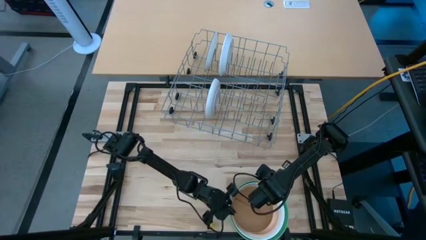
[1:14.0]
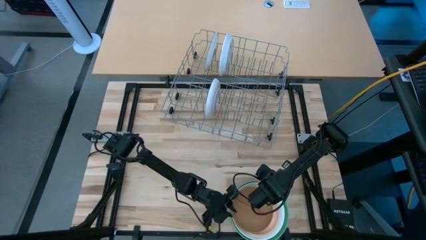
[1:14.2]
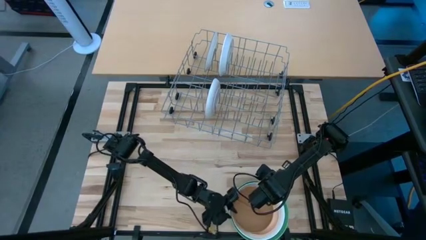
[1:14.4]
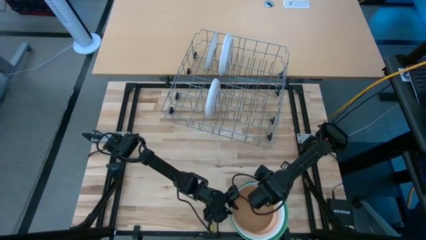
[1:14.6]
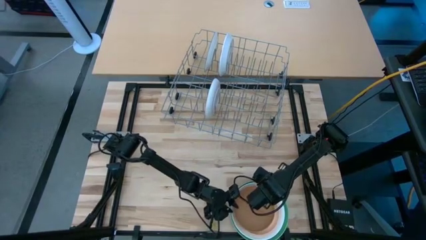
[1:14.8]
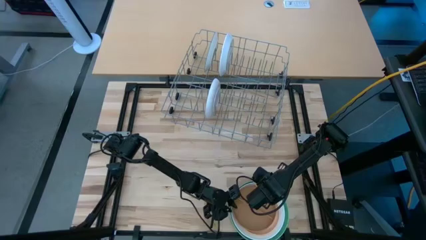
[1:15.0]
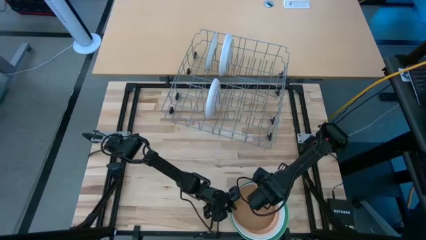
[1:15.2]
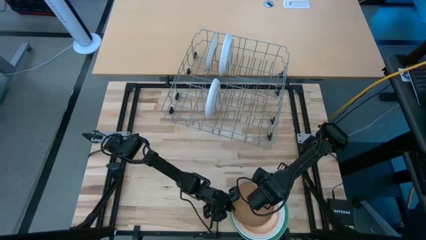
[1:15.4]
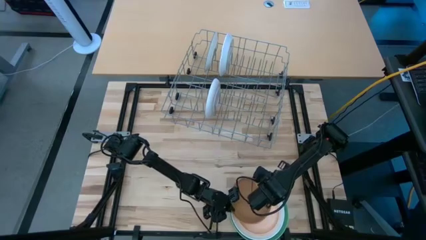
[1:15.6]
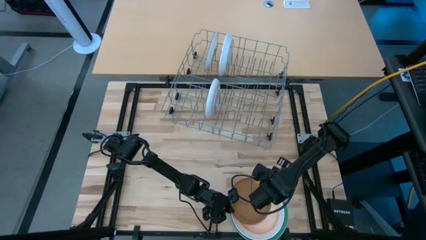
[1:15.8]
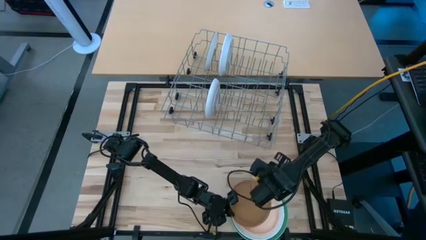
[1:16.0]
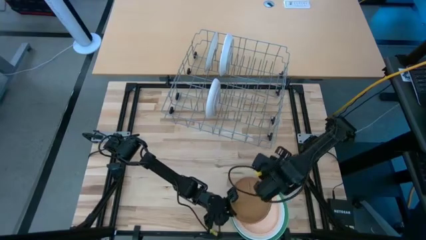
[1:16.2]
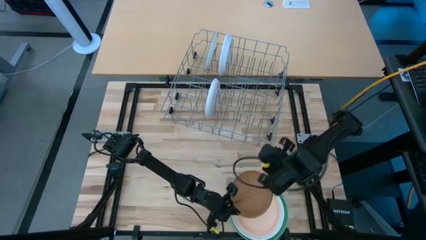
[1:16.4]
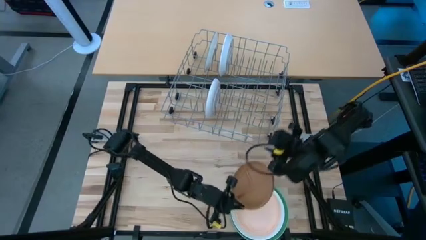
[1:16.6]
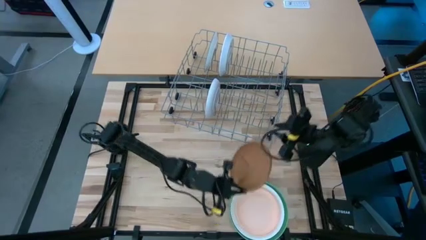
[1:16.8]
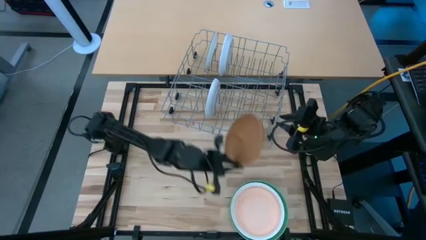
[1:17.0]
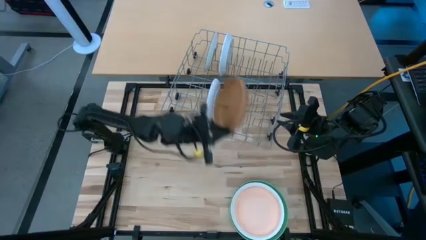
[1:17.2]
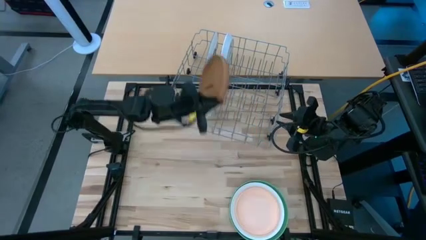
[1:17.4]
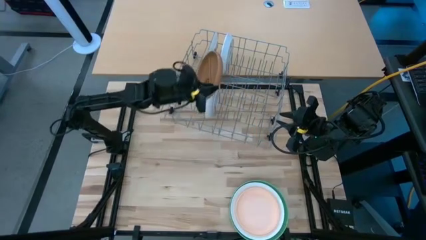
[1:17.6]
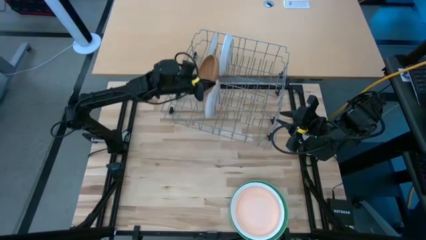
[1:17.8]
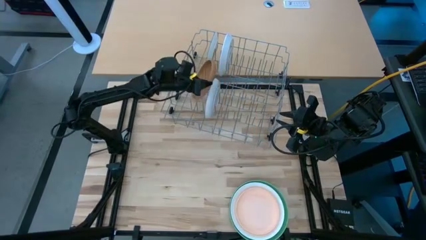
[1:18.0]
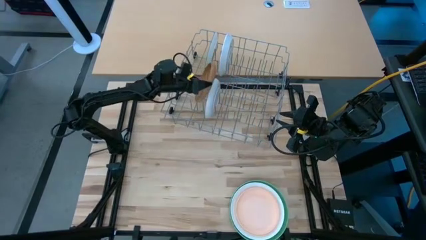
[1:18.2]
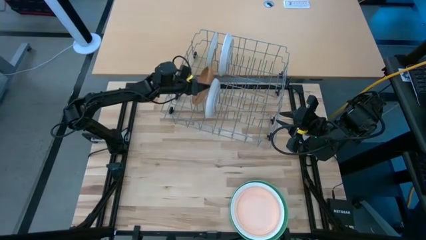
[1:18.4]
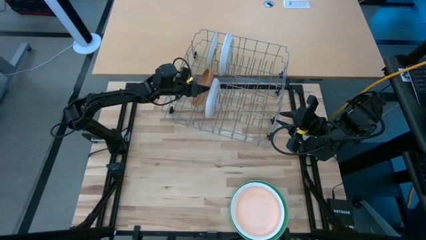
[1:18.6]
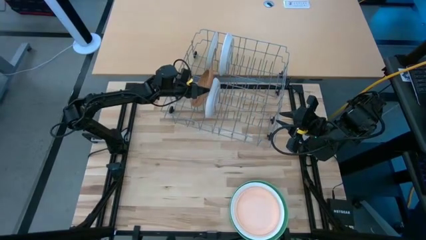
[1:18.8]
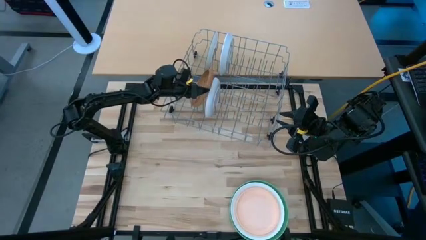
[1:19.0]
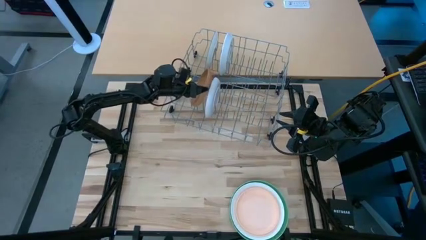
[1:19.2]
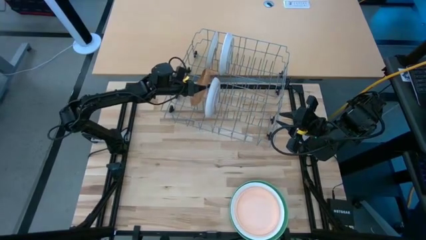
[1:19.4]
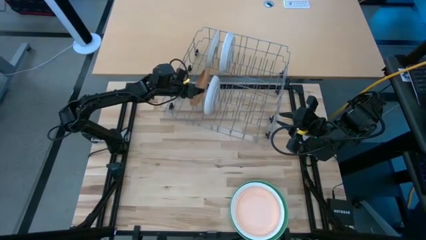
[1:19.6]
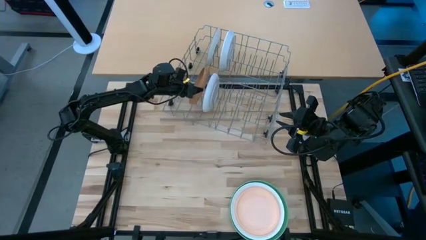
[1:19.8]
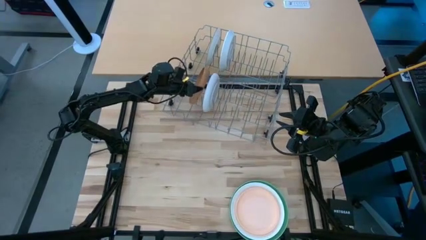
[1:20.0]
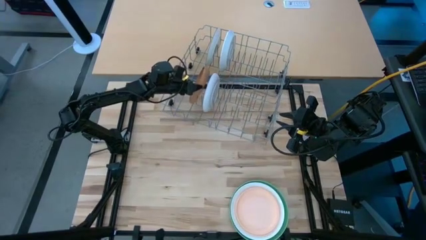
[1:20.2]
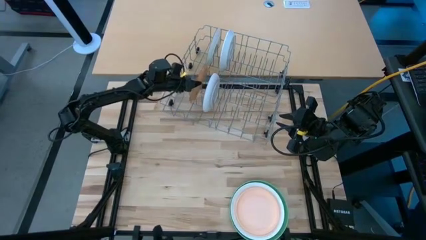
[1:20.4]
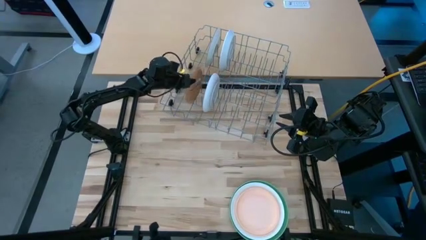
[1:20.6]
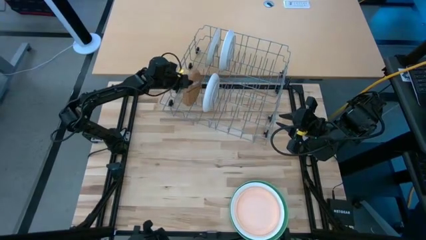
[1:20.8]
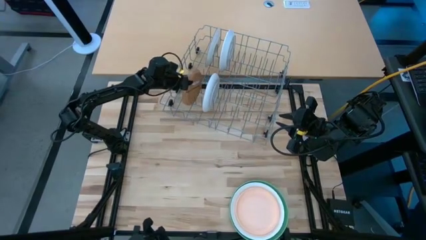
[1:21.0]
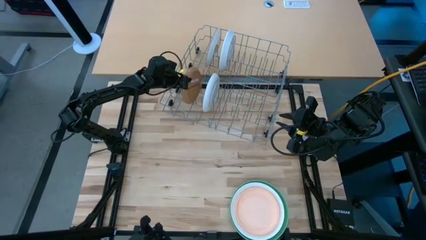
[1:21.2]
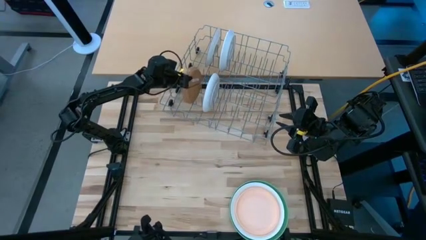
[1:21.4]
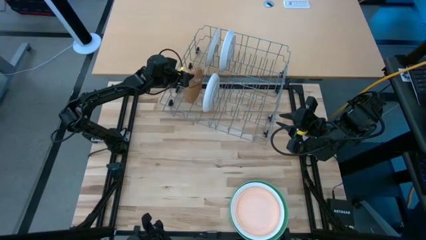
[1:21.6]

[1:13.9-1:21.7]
Task: Sort dishes
Put the brown plate into the gray dishwasher rack

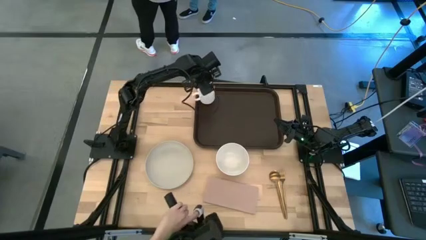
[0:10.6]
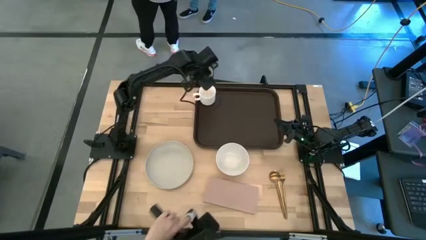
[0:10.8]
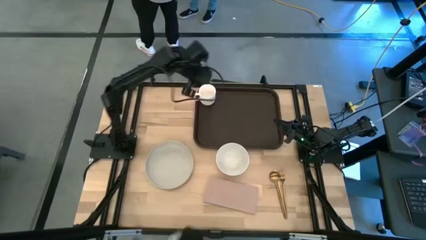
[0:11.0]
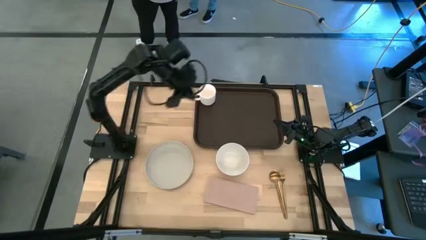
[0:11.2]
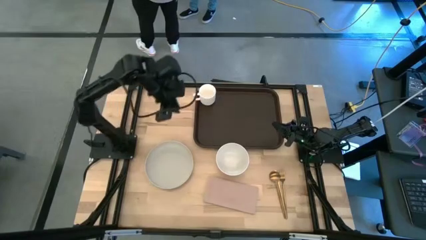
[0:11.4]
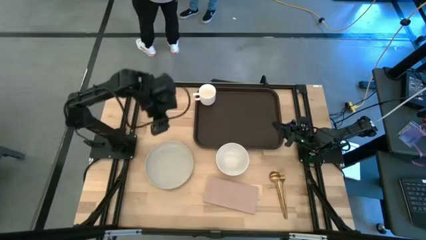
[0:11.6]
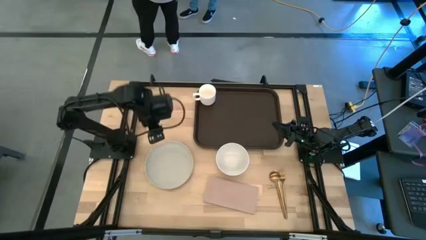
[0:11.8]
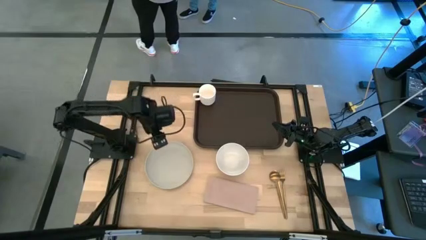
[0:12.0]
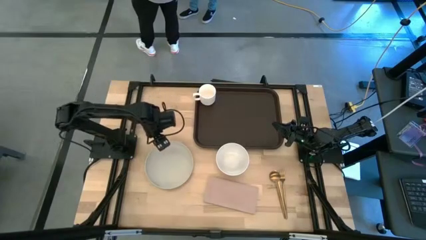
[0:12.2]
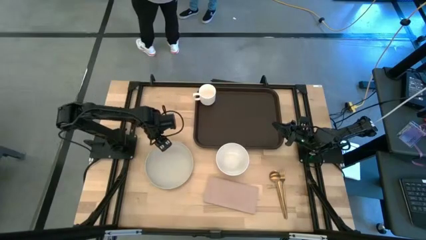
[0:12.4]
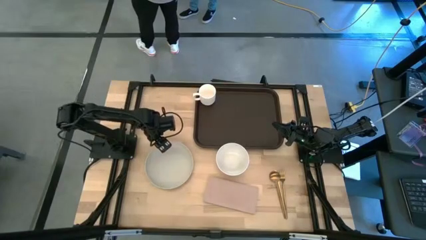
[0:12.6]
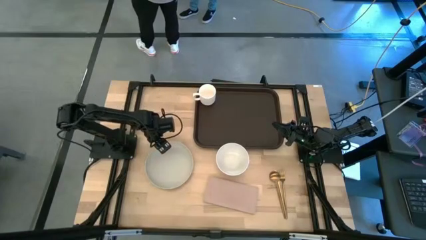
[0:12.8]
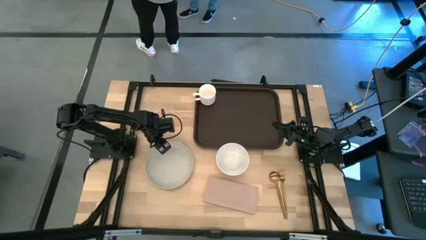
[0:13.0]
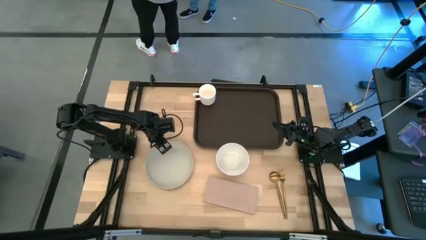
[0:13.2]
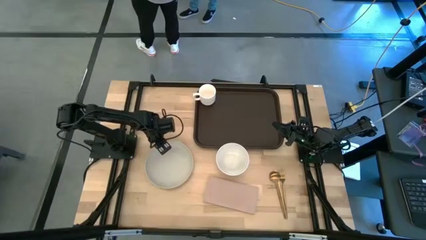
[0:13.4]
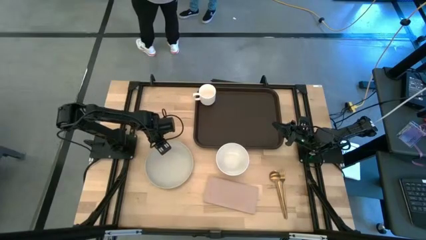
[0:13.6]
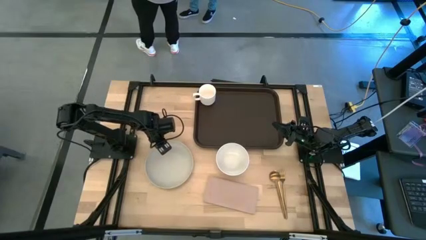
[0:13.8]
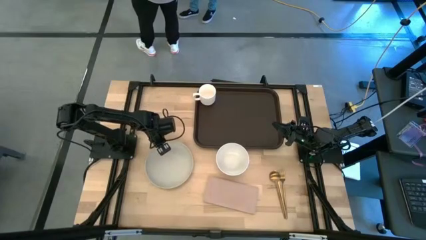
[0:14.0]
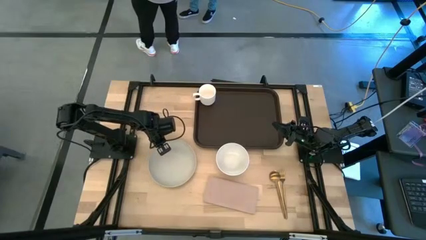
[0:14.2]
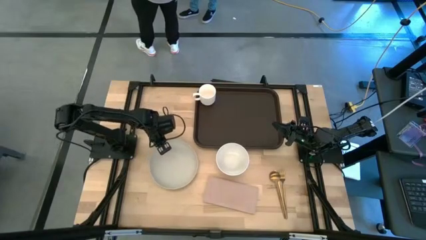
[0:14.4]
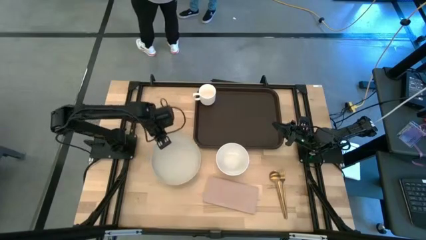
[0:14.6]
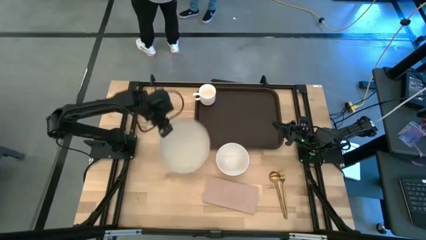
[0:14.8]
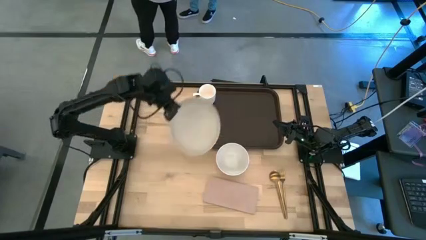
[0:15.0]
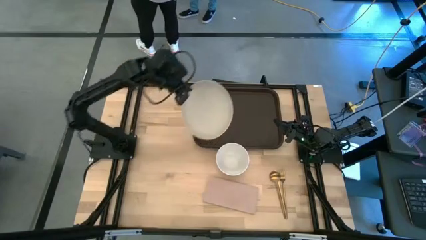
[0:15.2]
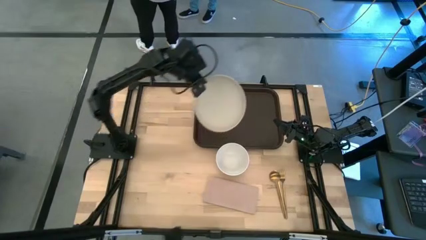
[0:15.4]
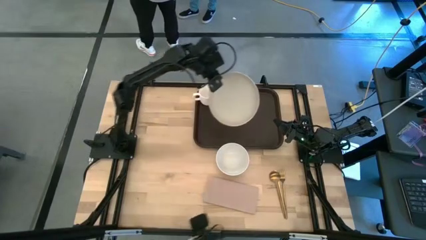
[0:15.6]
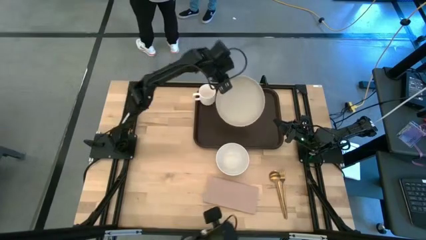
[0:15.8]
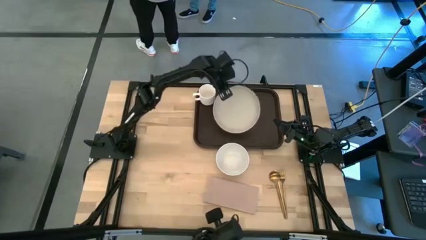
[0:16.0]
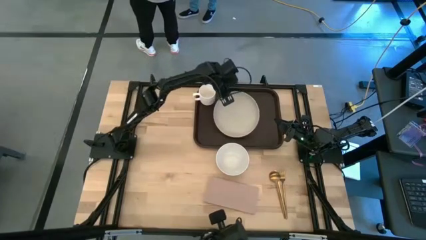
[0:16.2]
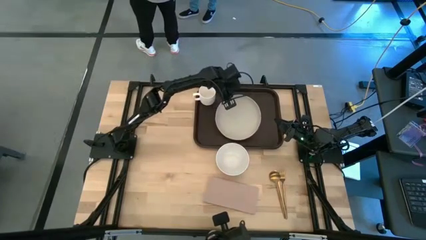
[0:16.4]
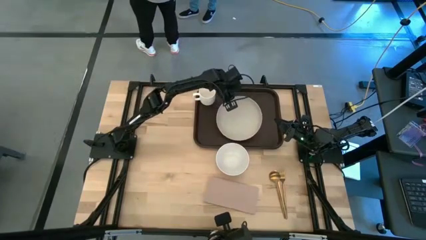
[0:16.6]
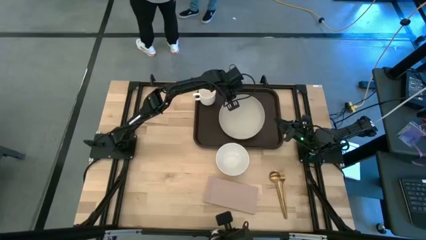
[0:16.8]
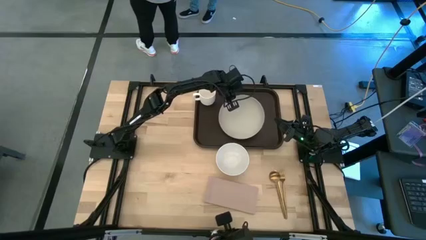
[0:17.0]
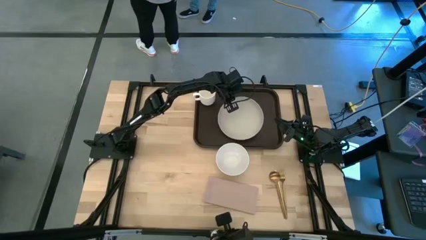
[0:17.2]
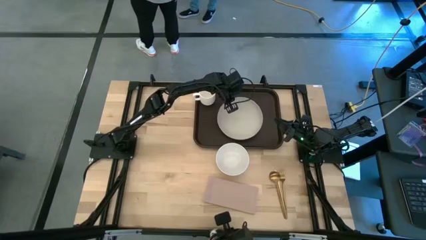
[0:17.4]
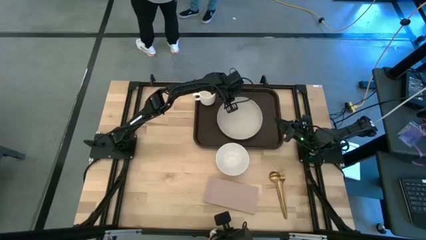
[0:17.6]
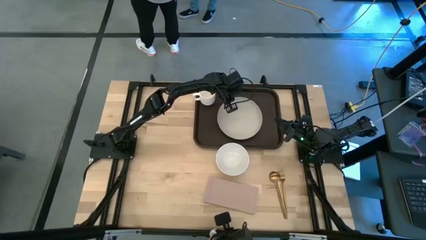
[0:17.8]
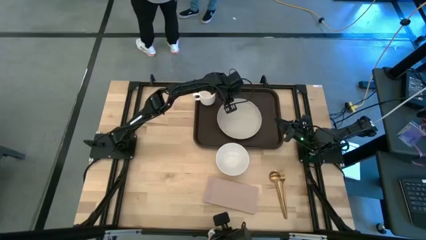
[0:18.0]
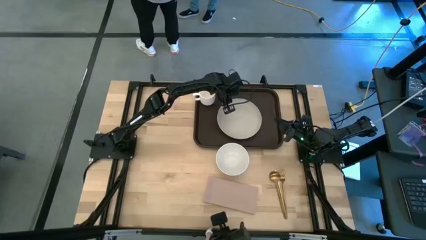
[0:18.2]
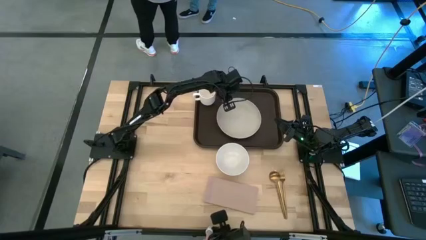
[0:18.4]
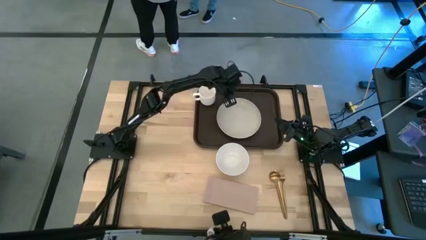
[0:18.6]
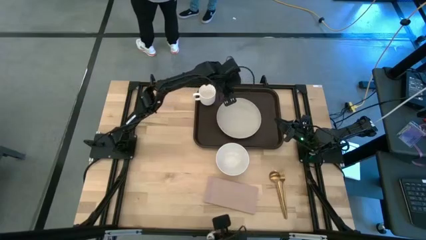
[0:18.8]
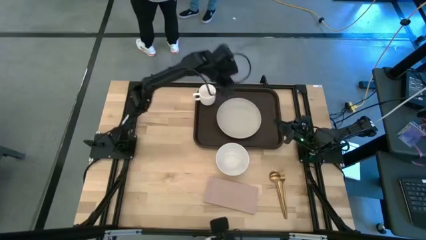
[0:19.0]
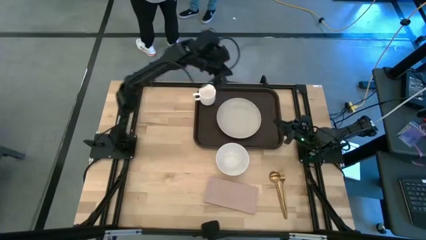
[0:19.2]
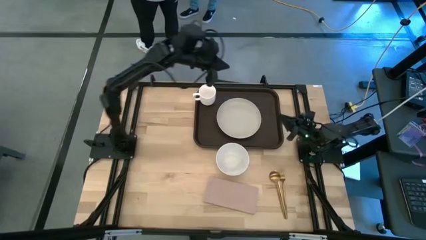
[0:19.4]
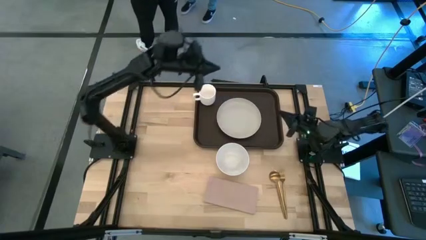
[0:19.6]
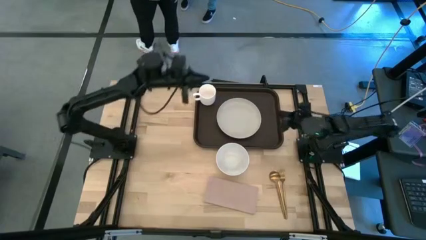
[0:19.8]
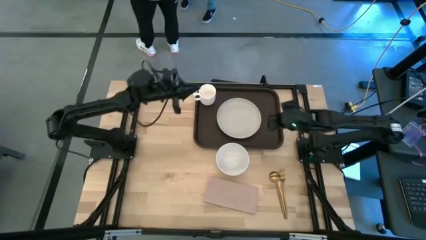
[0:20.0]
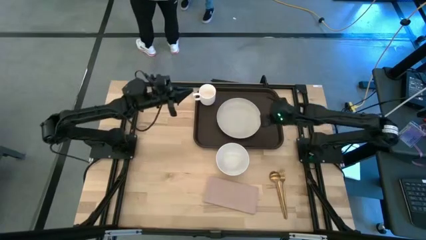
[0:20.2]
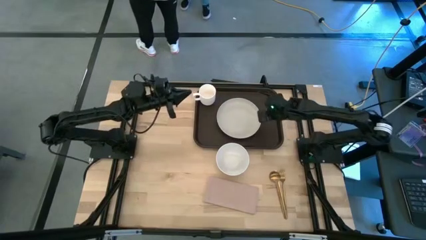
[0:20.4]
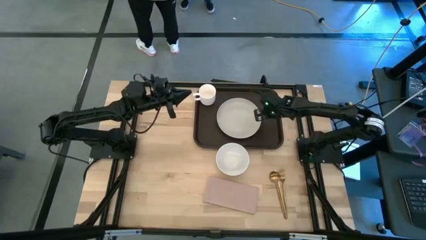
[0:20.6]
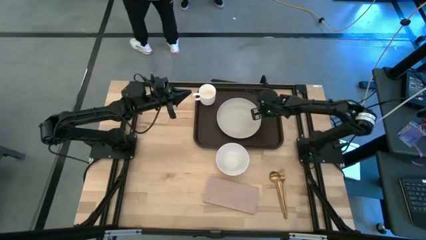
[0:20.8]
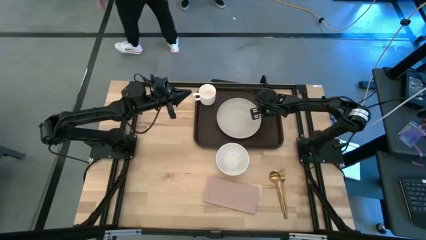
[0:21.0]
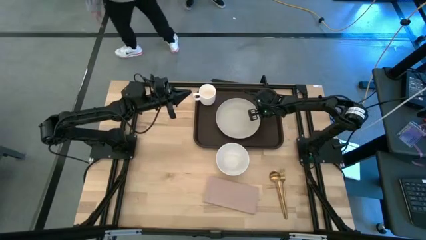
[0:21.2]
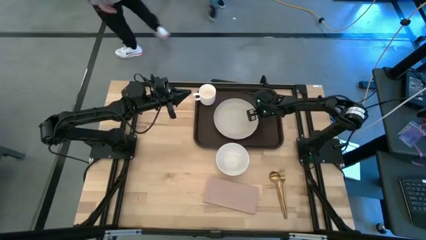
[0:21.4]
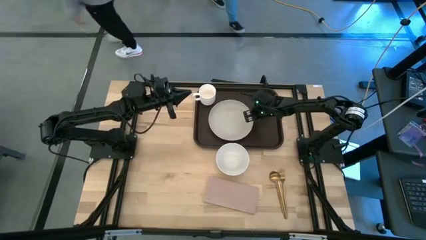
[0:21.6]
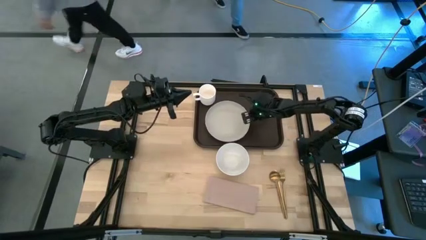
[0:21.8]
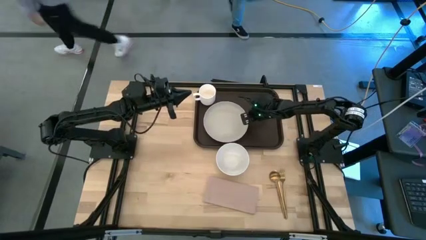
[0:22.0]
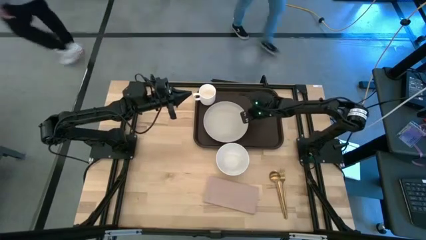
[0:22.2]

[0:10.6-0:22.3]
Task: Set up tray
Put the gray plate to the bottom right of the white mug on the black serving tray
